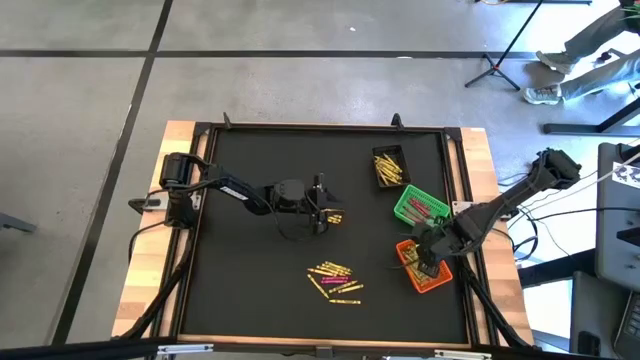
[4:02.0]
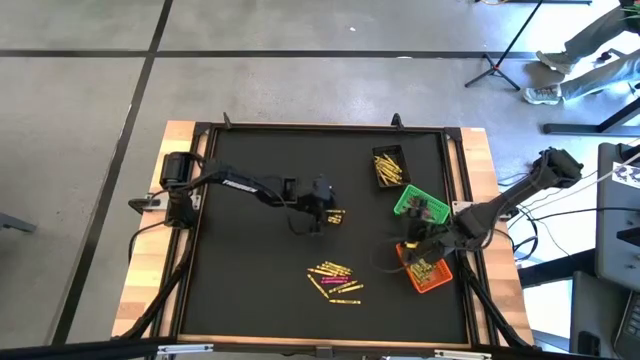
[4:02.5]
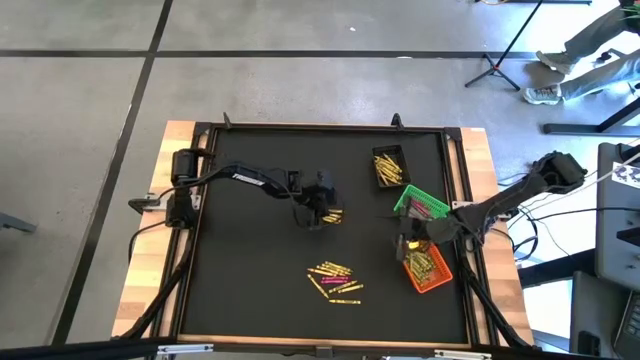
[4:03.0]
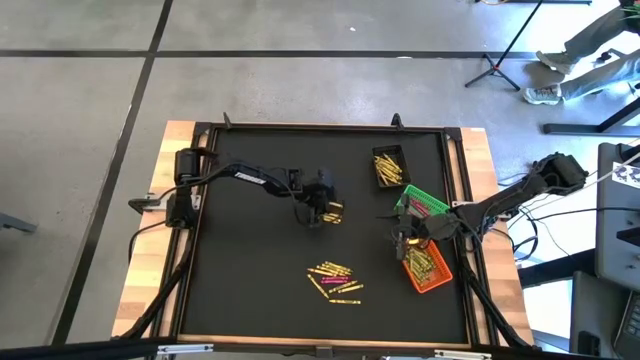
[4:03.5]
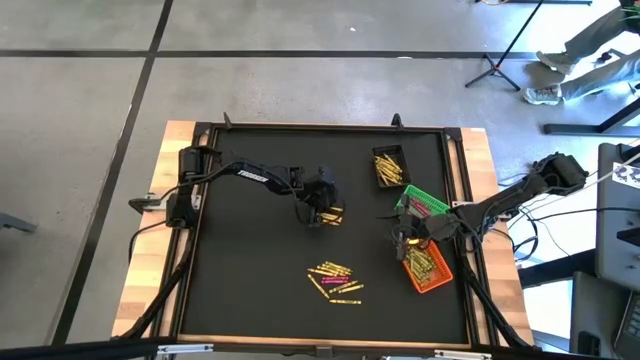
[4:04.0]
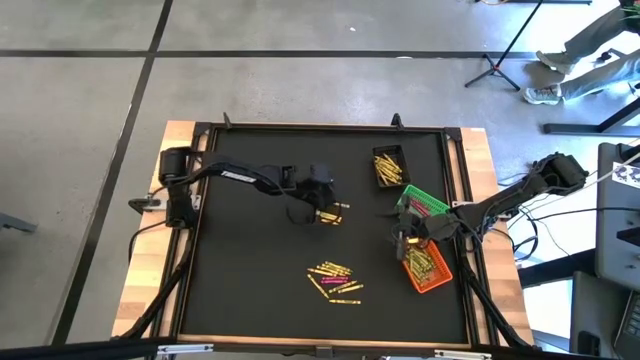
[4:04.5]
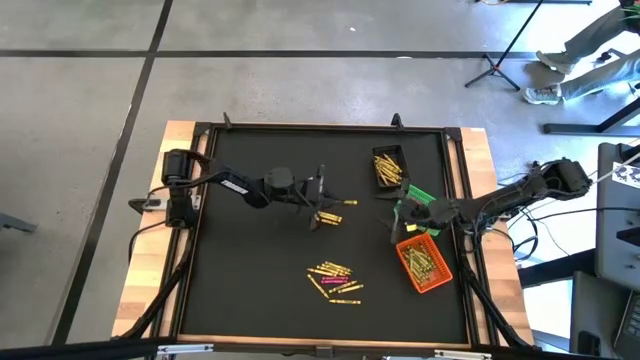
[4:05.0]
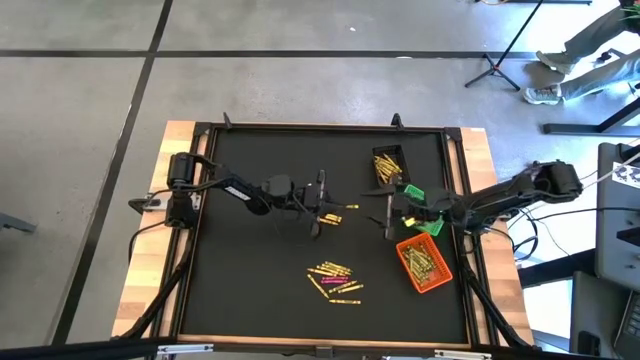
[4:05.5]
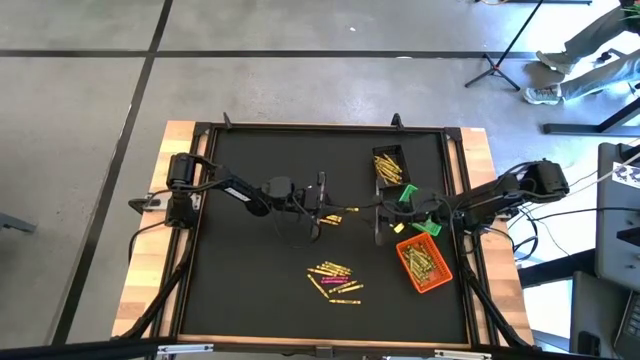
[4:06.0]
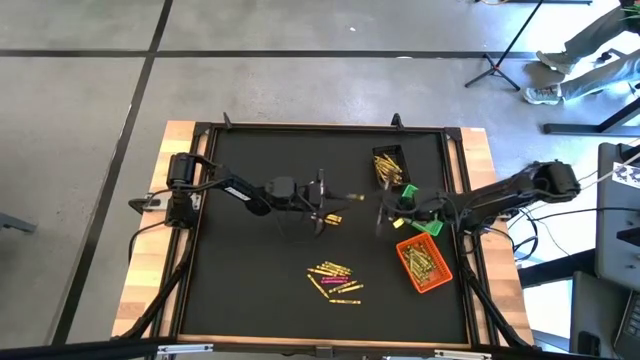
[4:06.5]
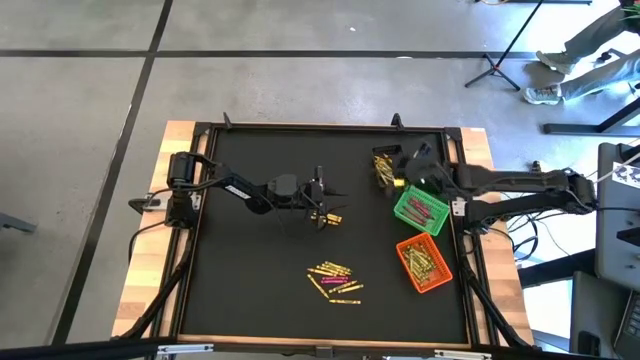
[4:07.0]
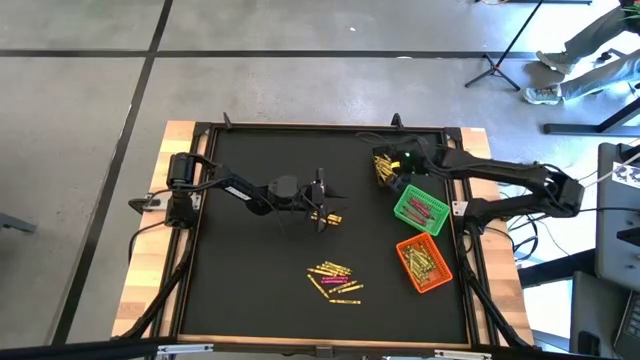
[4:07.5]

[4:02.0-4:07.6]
Task: Sort crayons
Put the yellow crayon into the black basket

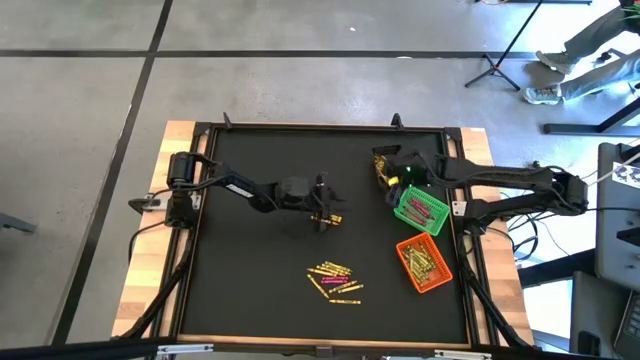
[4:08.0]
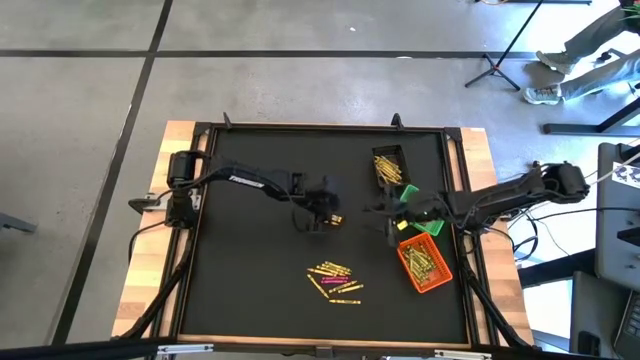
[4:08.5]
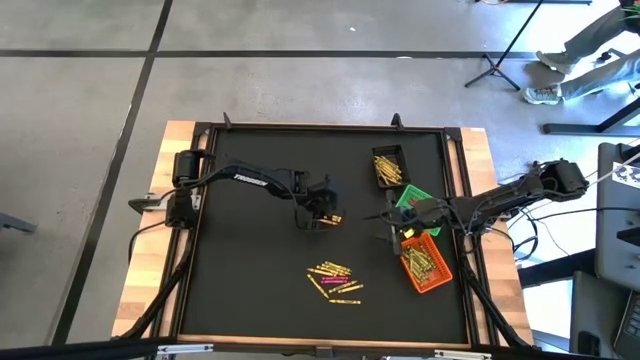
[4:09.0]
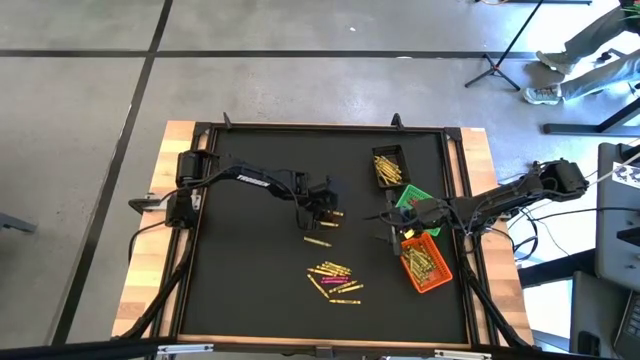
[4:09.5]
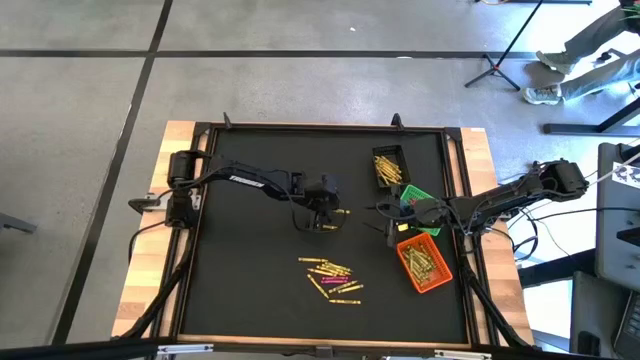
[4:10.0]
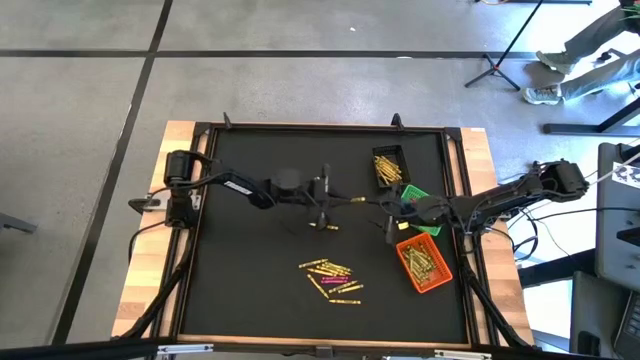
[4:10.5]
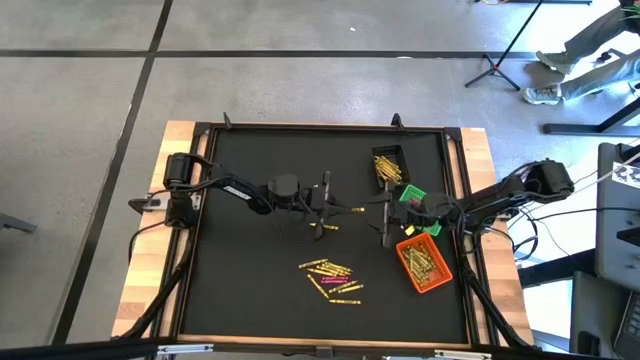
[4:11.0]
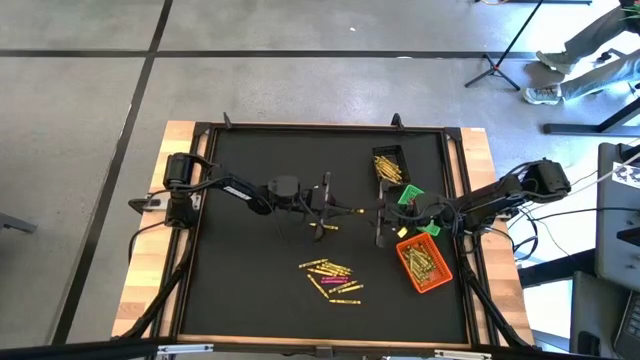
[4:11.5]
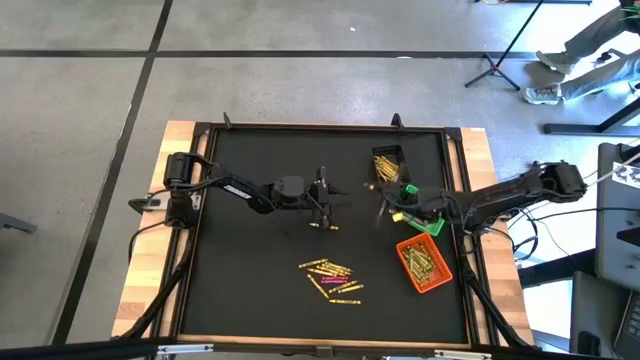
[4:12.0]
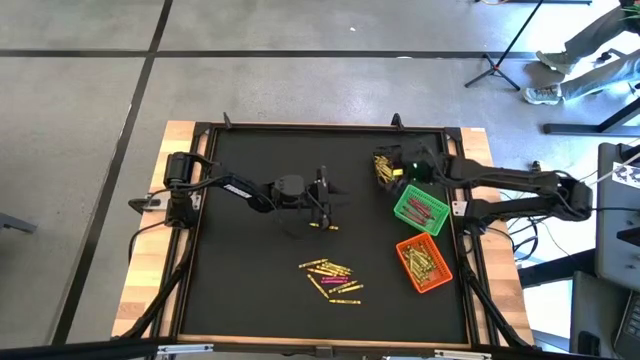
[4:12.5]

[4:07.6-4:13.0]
Put the yellow crayon into the black basket

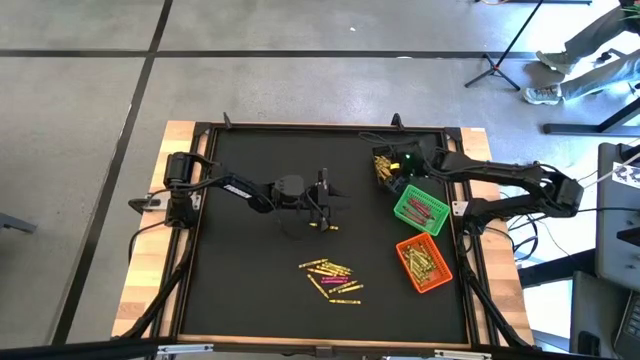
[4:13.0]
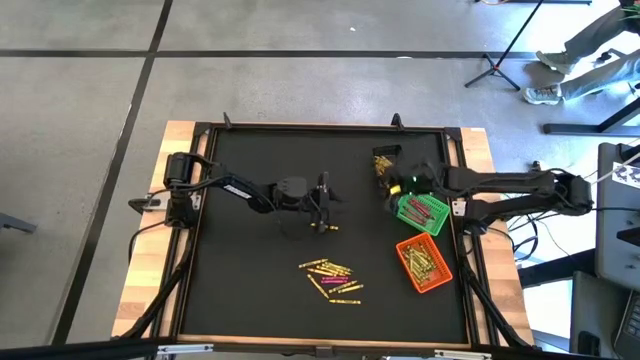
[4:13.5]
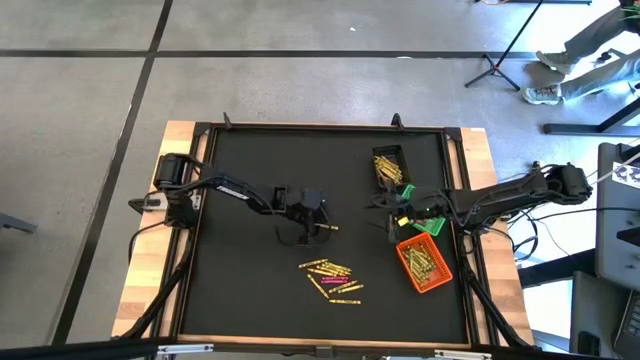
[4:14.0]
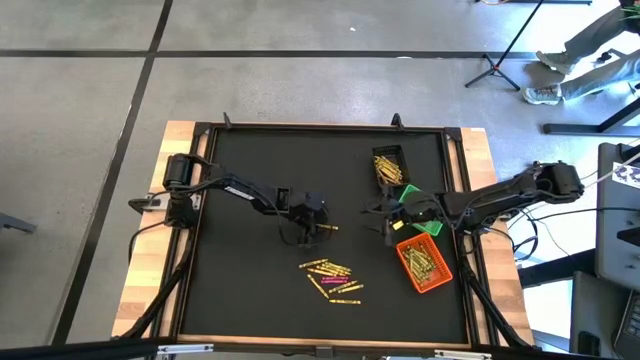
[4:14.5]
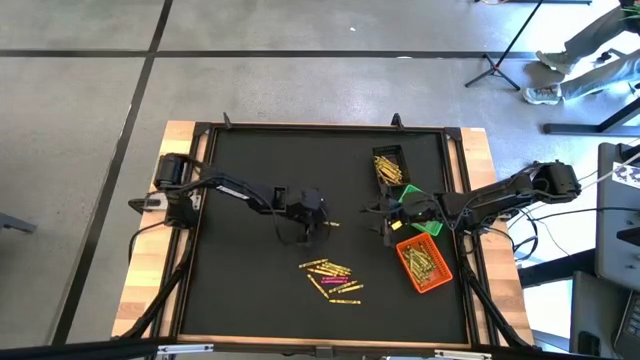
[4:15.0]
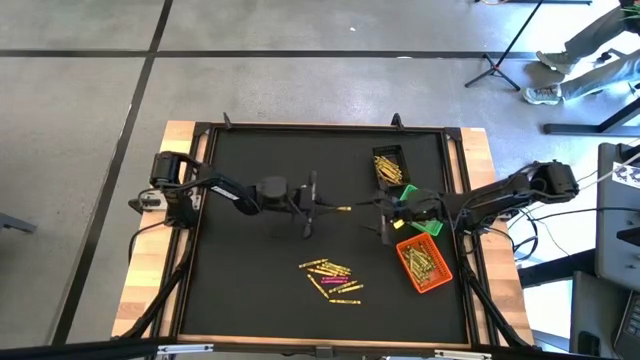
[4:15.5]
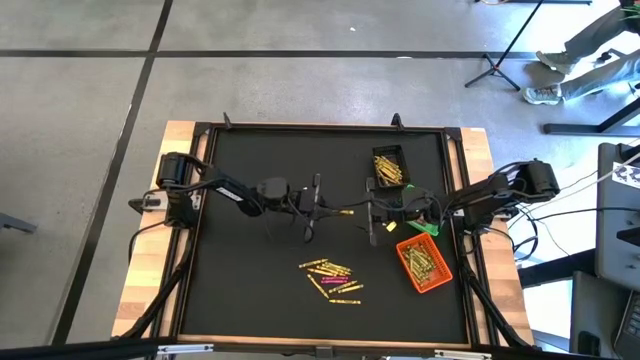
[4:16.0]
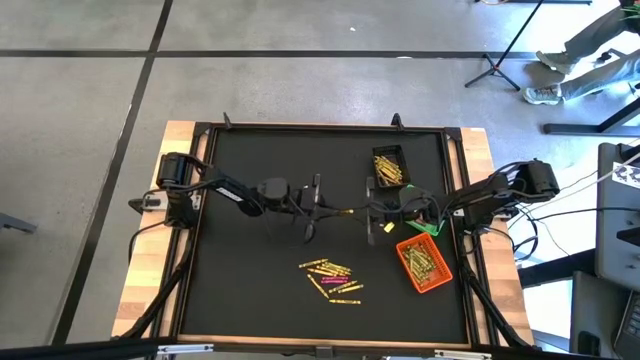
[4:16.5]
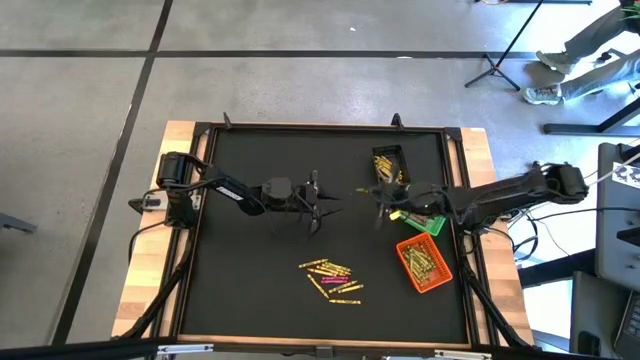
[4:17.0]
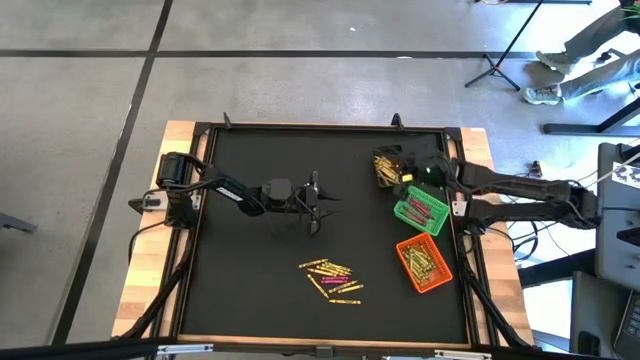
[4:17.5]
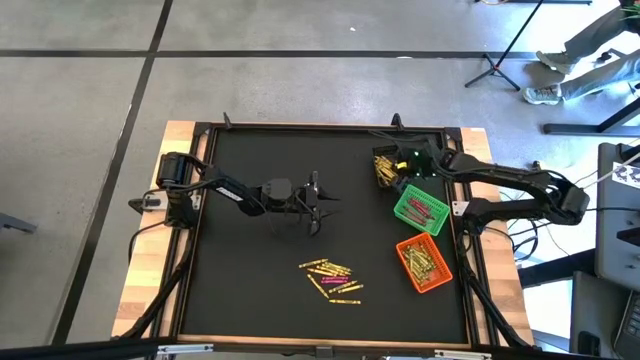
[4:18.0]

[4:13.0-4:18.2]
Put the yellow crayon into the black basket

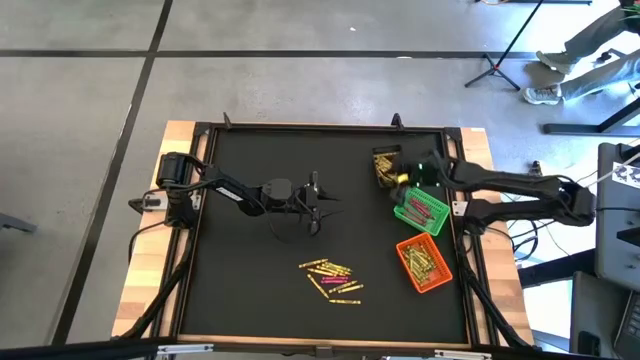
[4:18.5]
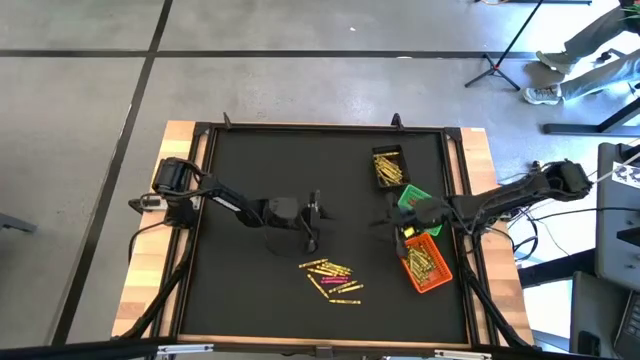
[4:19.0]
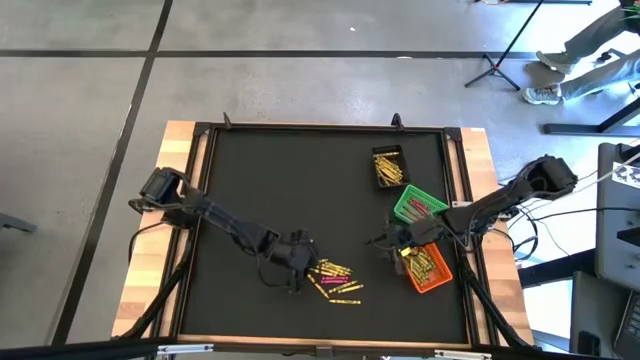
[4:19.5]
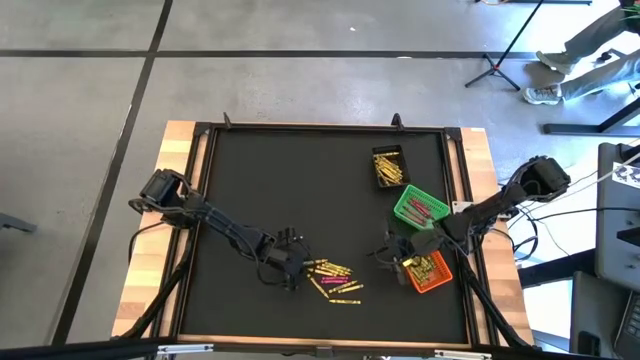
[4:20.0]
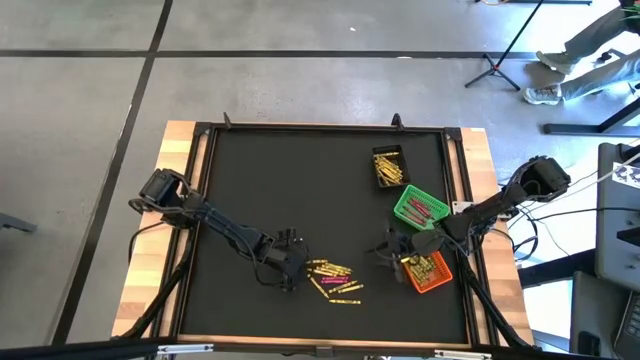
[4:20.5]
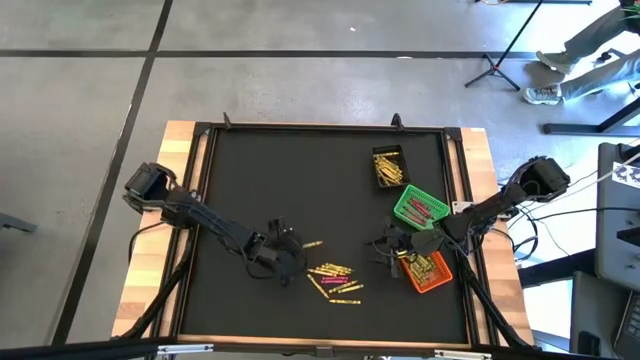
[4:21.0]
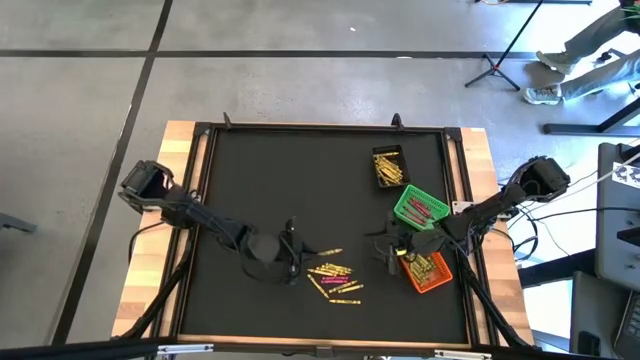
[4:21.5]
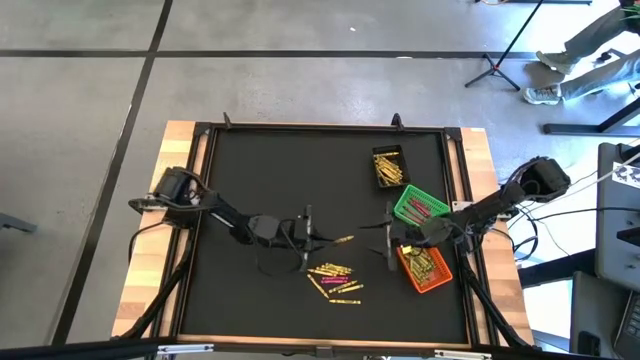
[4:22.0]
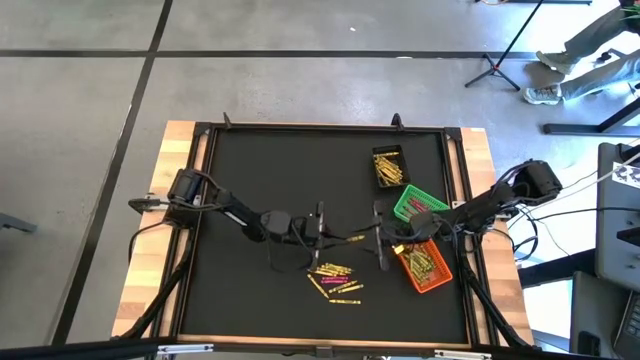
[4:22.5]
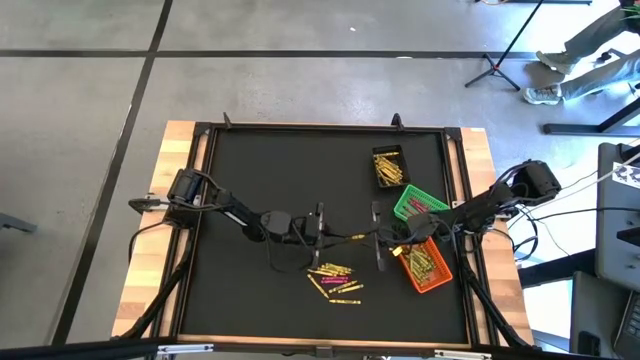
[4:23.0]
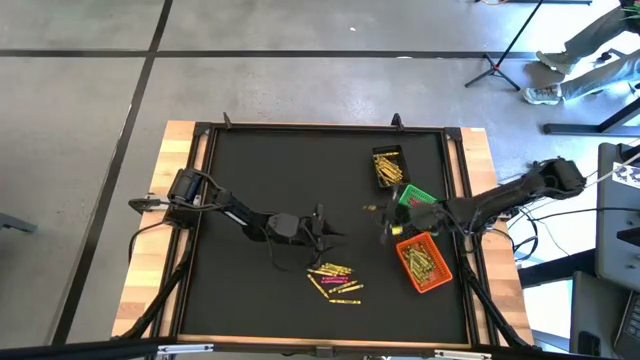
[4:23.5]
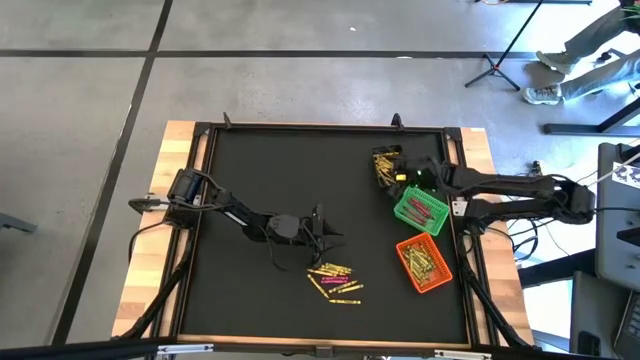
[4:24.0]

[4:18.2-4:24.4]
Put the yellow crayon into the black basket
